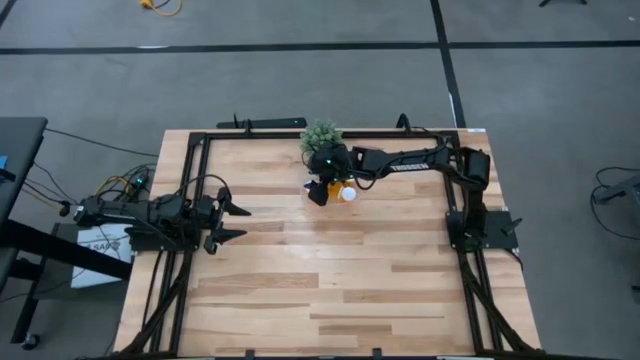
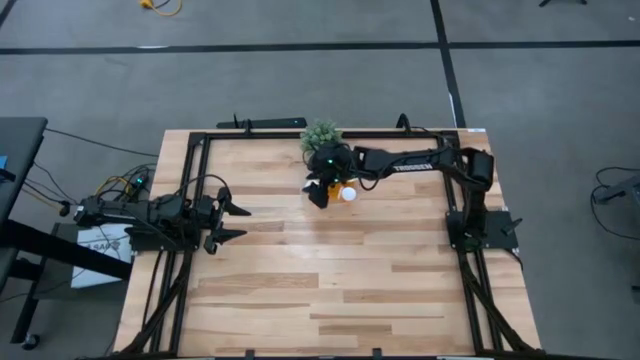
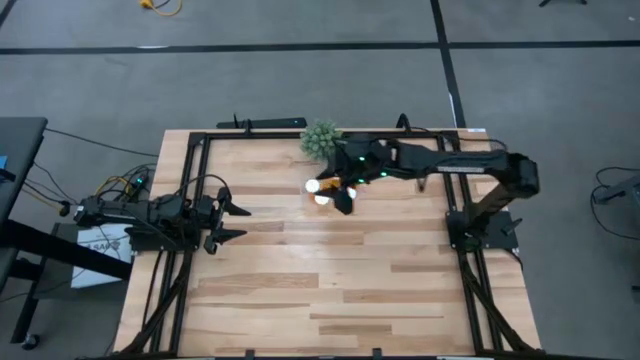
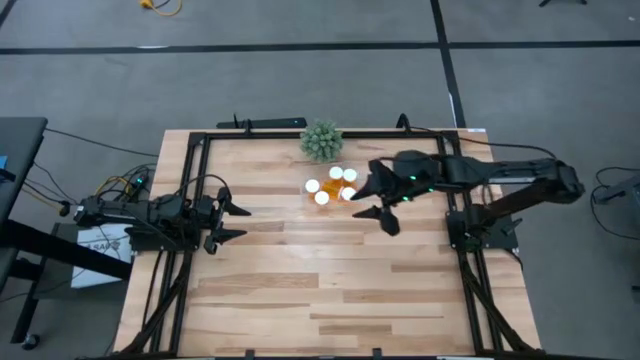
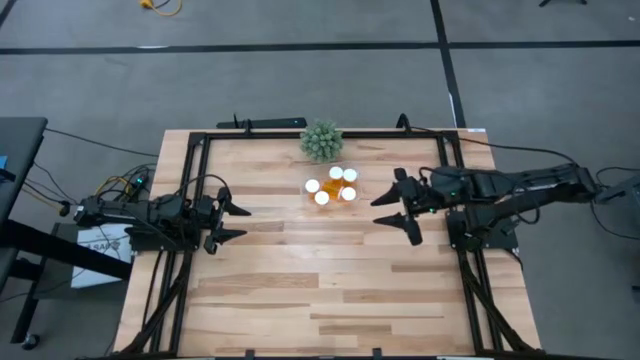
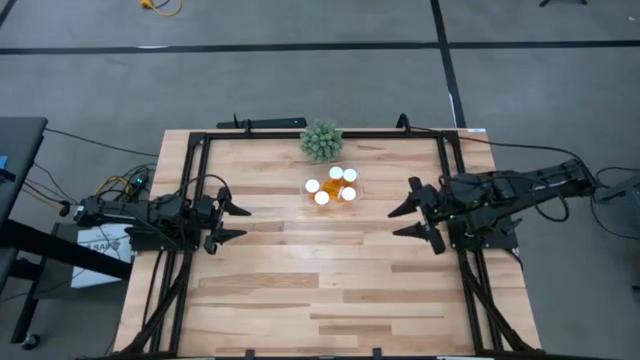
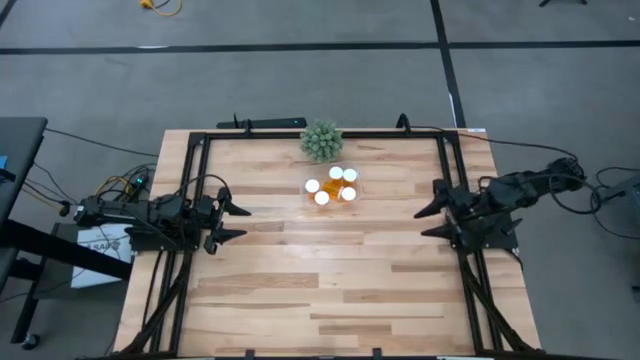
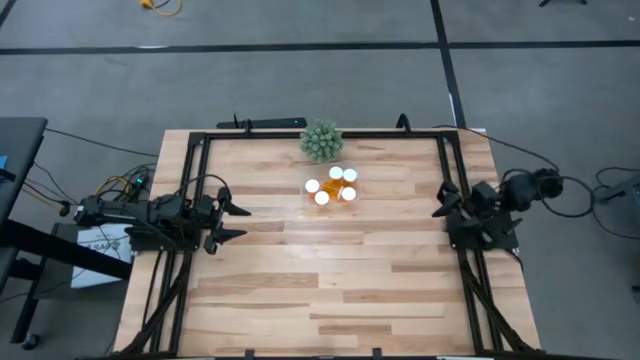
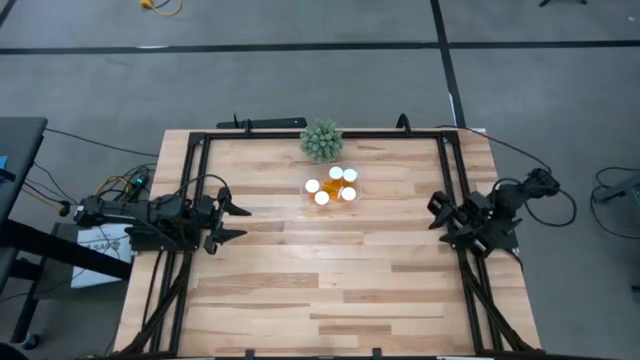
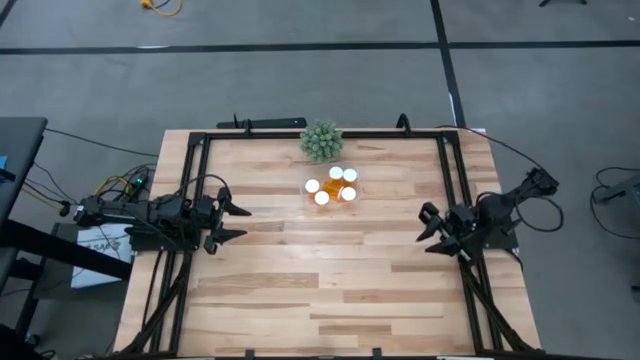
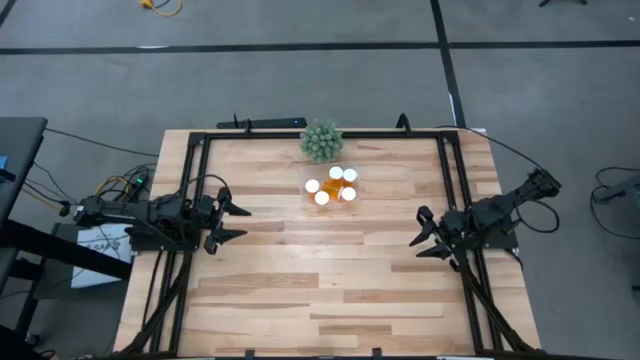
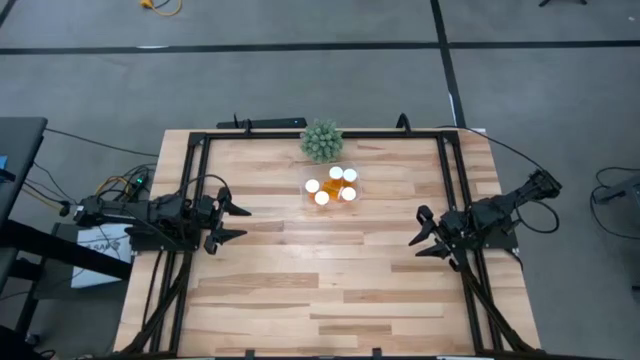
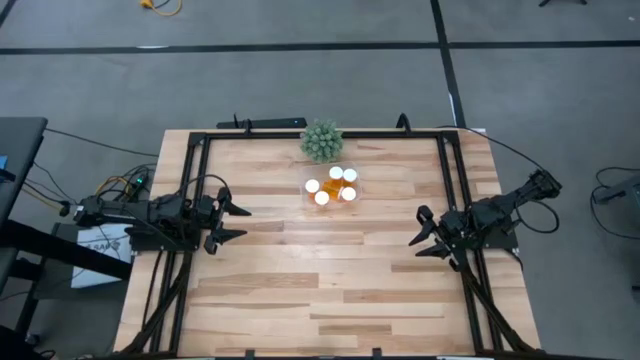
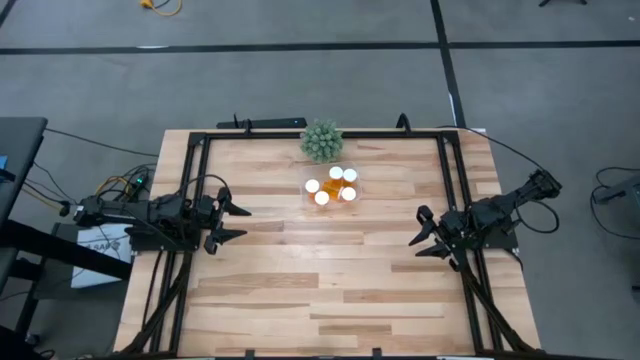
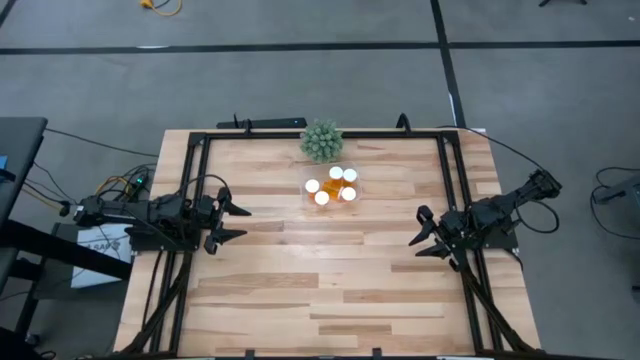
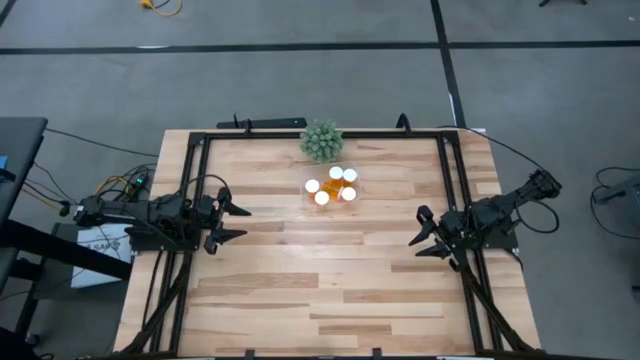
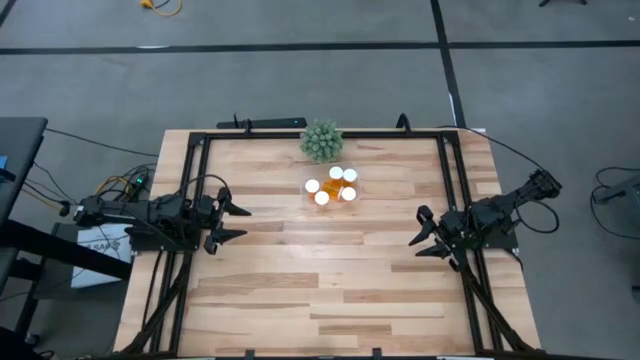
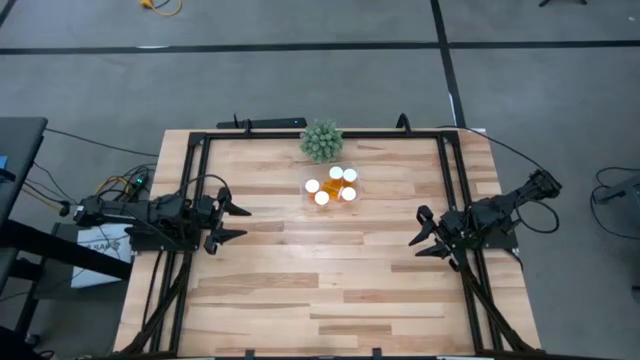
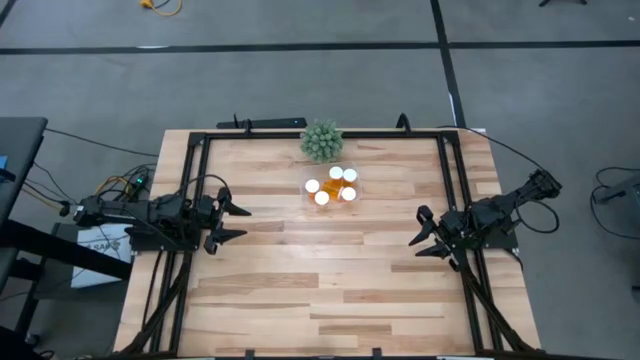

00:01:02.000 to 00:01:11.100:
Task: Pick and place pill bottles into a basket
Return to Home Position

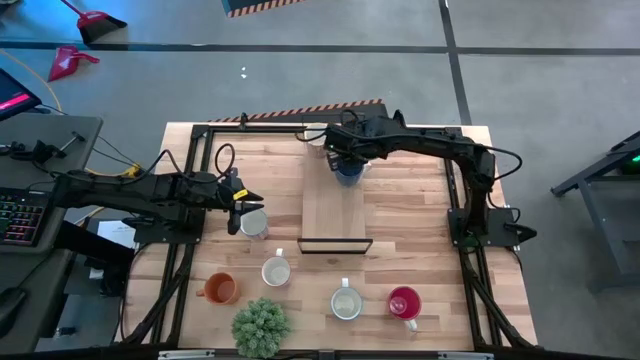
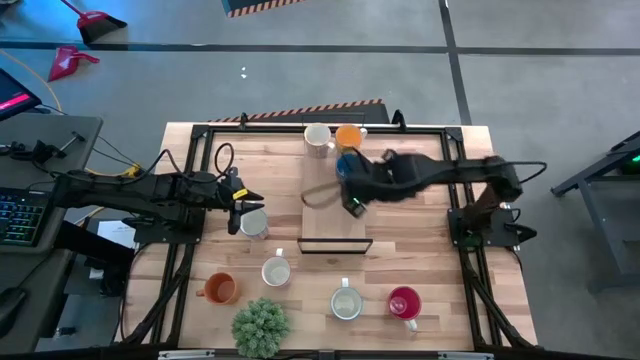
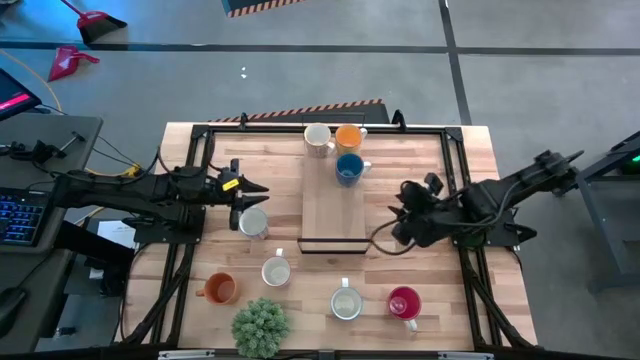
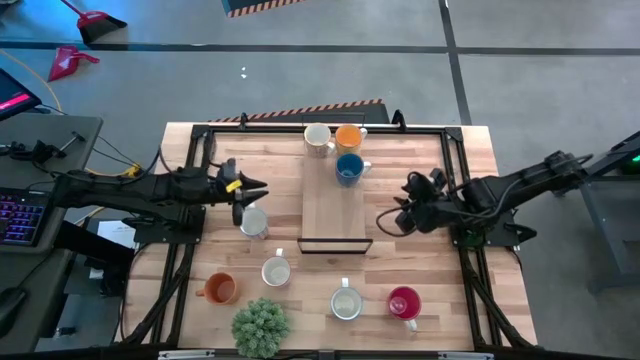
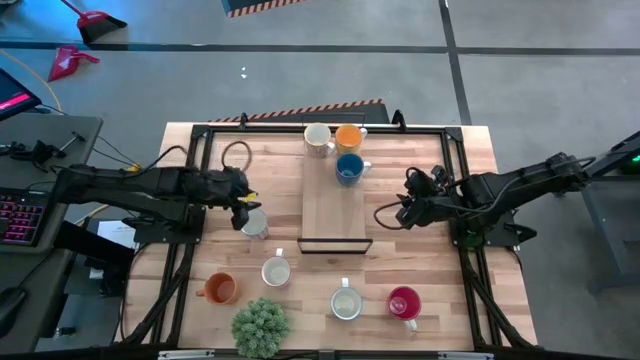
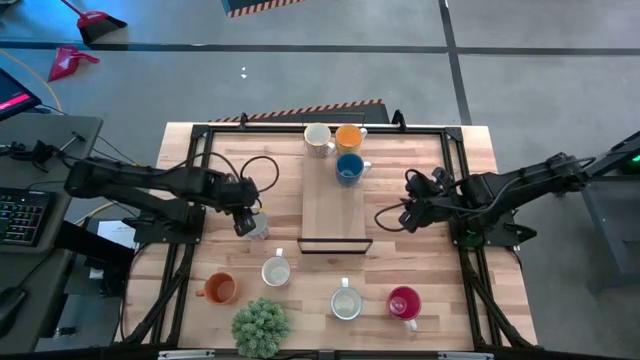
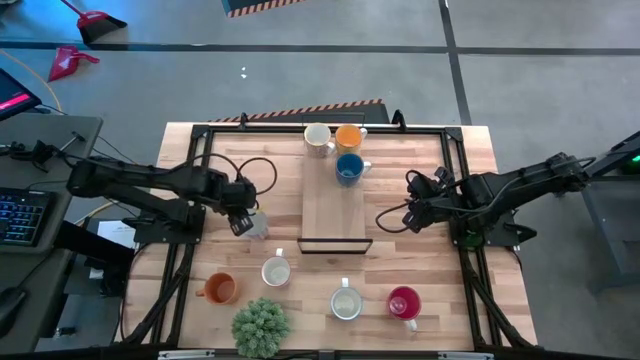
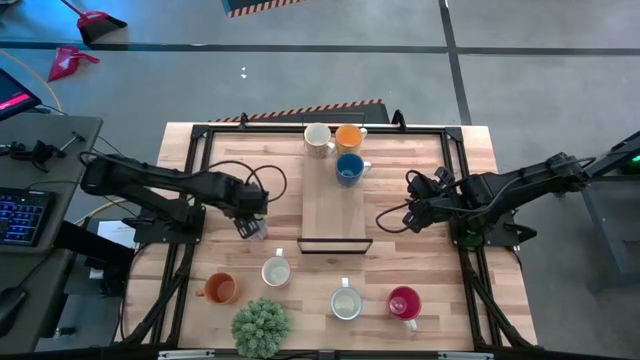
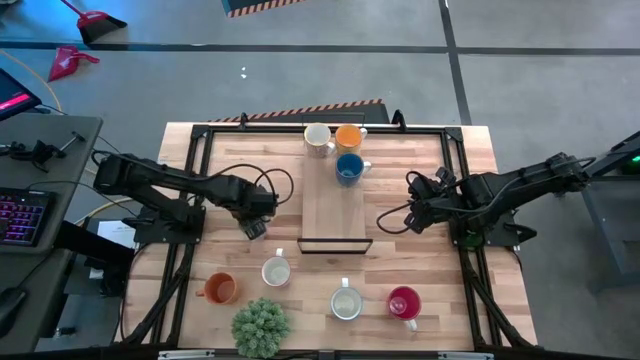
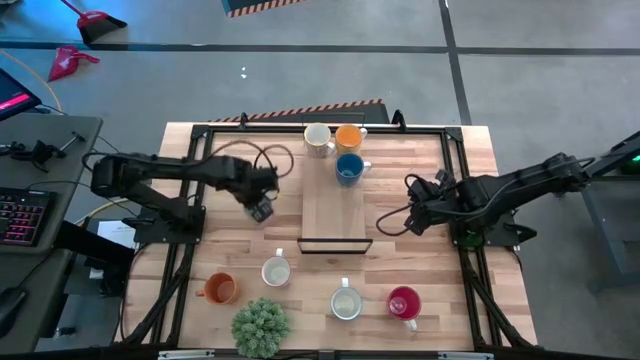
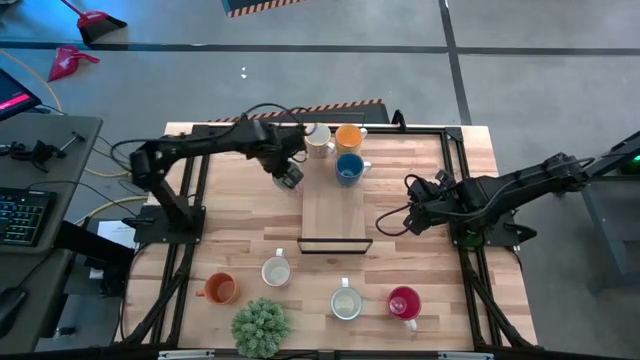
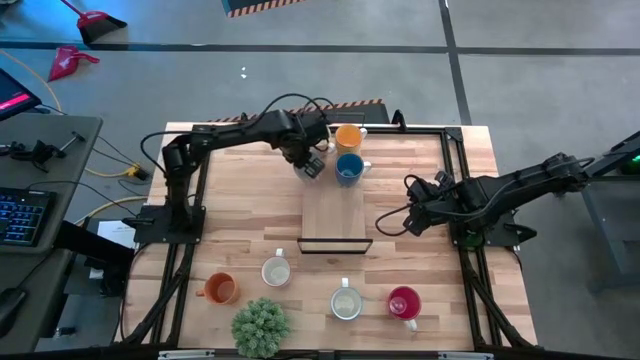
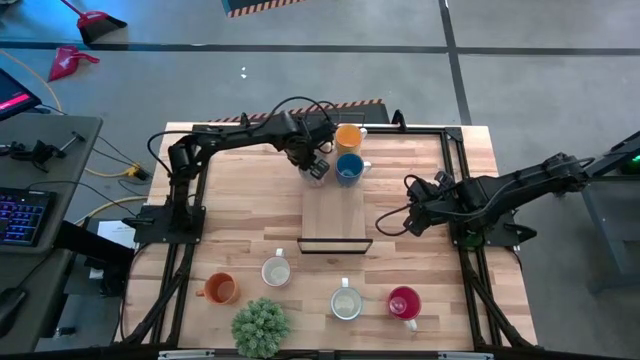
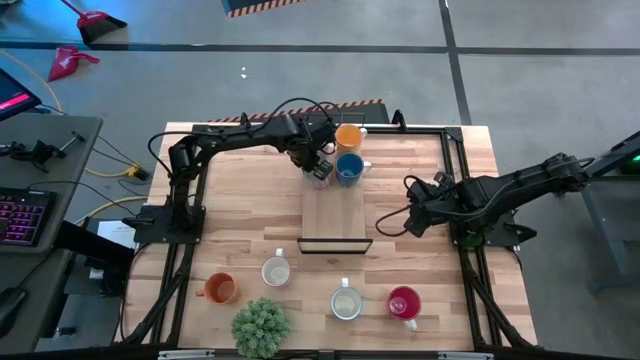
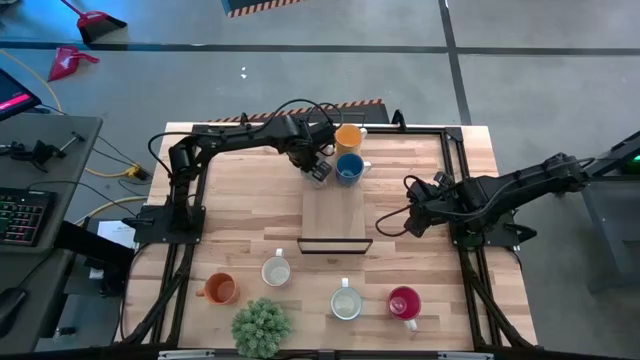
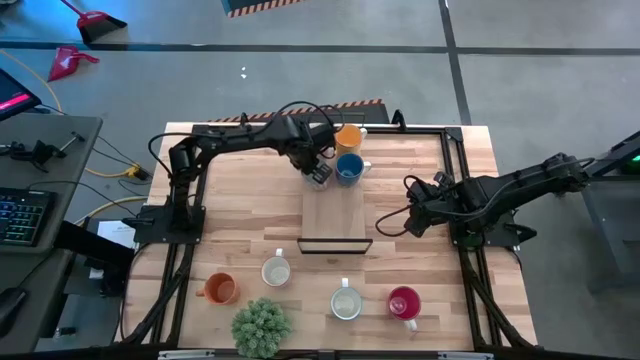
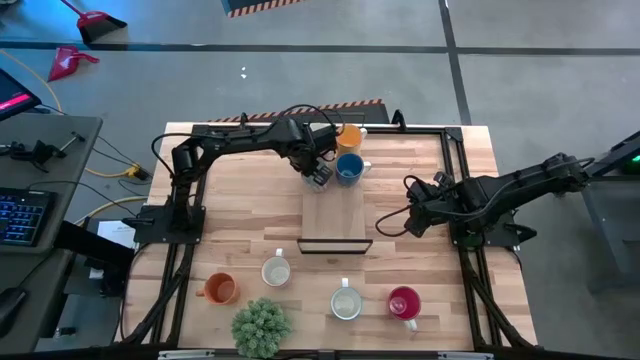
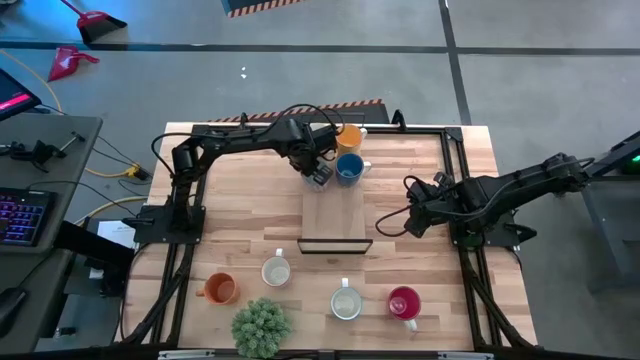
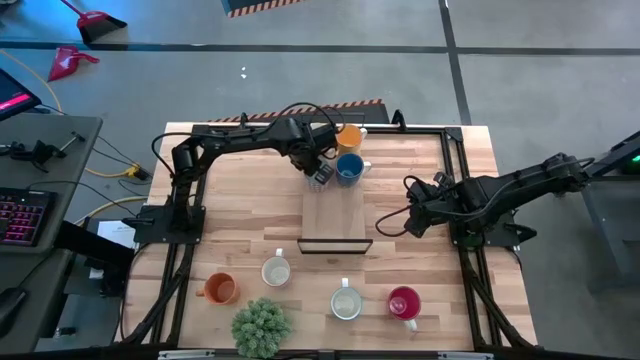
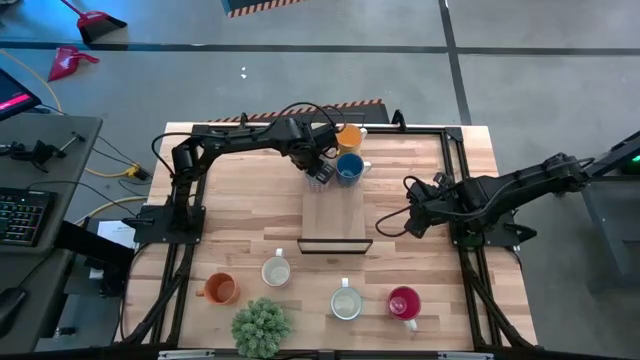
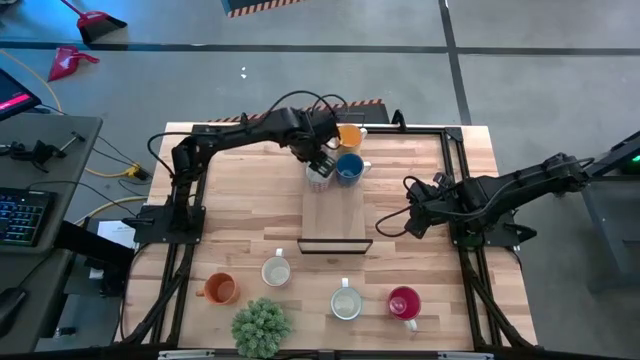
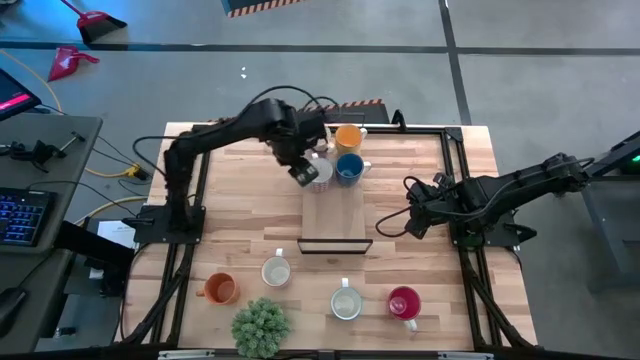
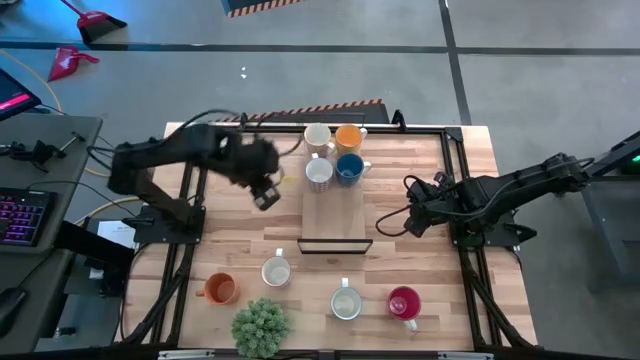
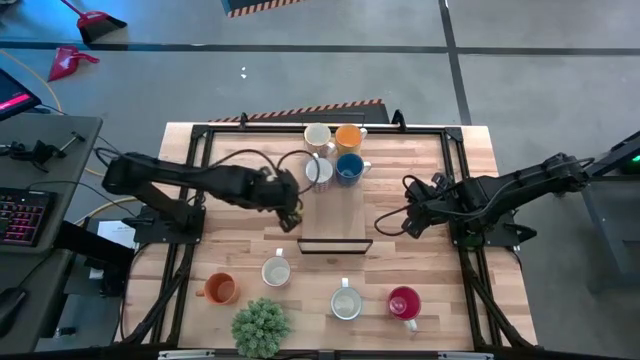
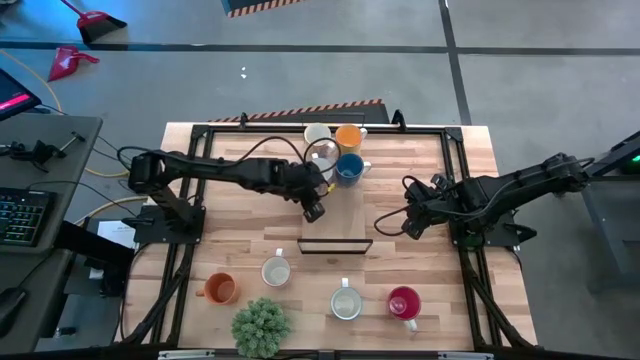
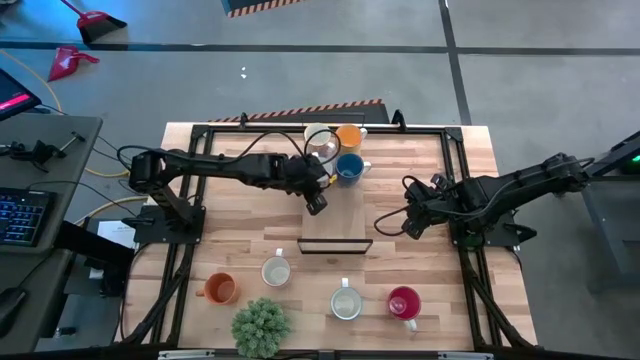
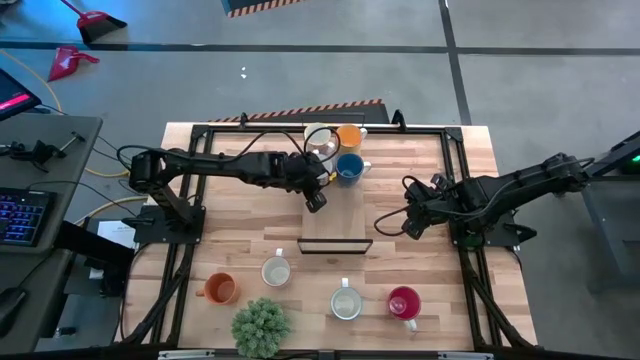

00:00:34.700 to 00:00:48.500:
Task: Place coffee mugs
Put the brown cup on the shelf aligned with the other blue cup
